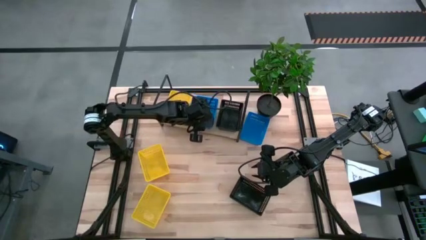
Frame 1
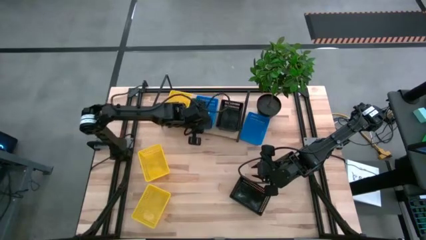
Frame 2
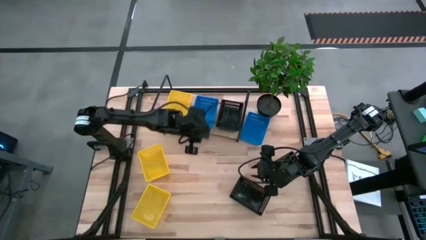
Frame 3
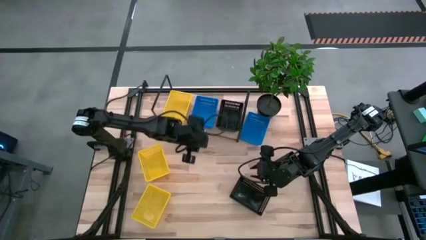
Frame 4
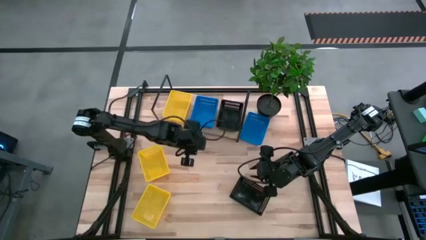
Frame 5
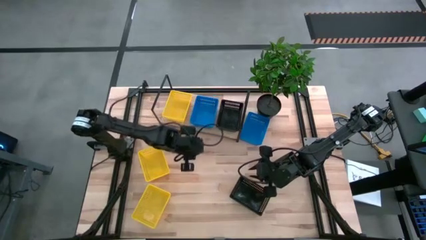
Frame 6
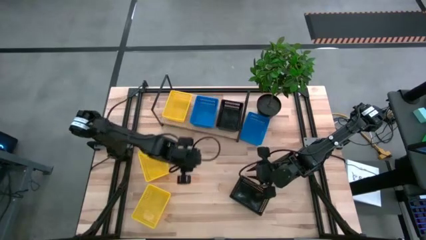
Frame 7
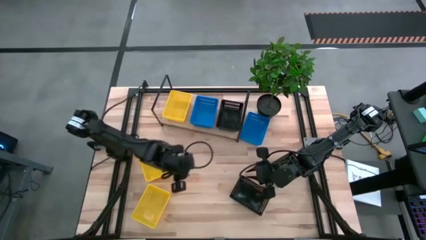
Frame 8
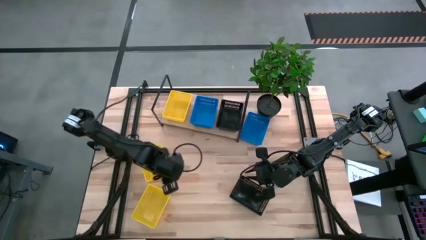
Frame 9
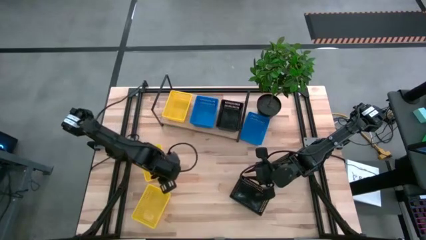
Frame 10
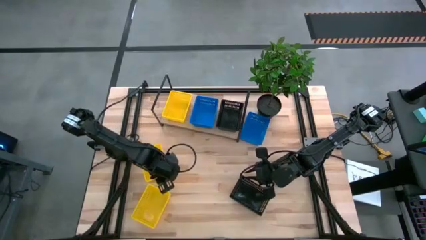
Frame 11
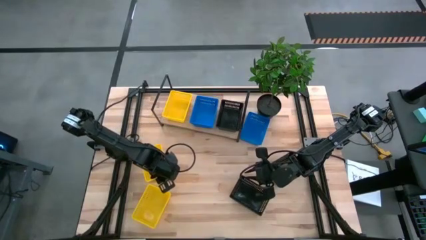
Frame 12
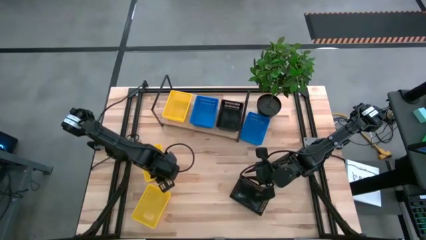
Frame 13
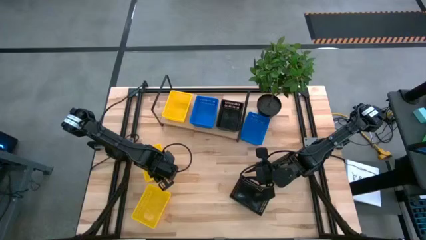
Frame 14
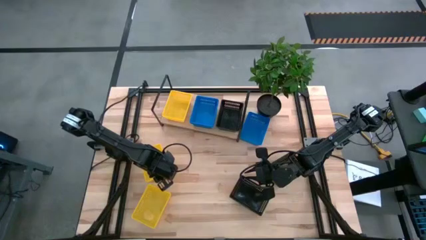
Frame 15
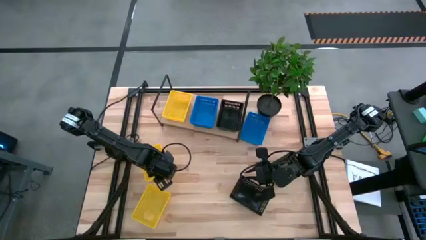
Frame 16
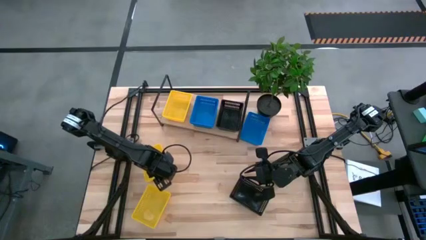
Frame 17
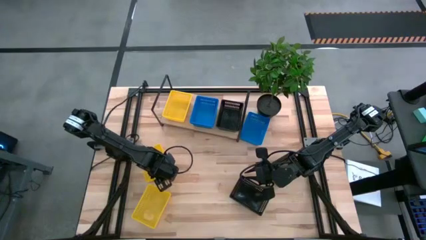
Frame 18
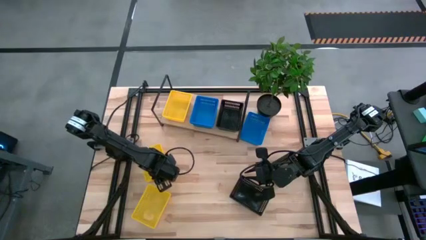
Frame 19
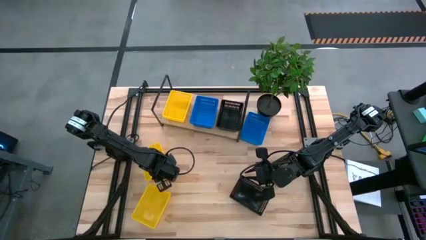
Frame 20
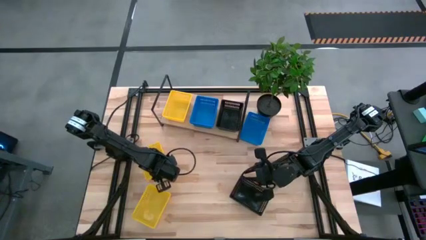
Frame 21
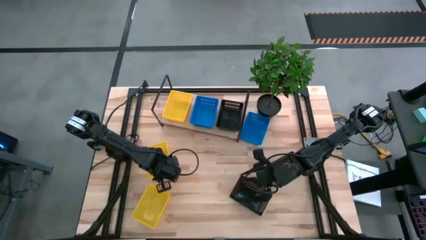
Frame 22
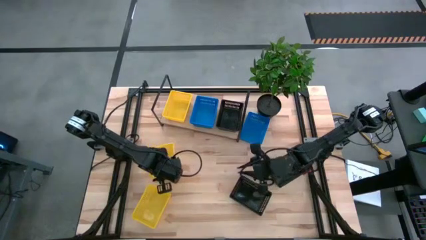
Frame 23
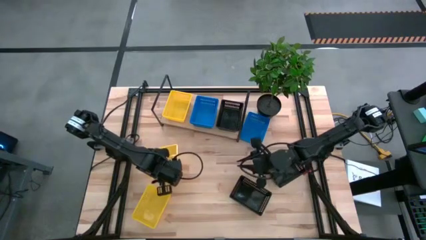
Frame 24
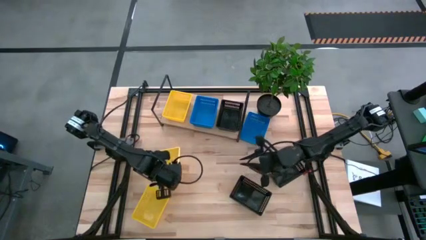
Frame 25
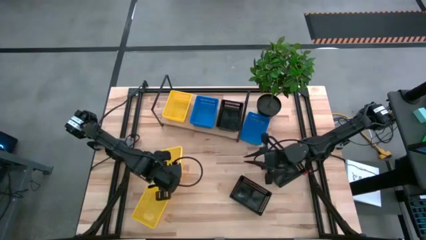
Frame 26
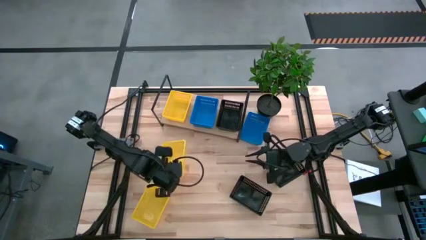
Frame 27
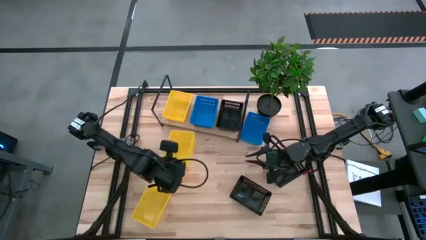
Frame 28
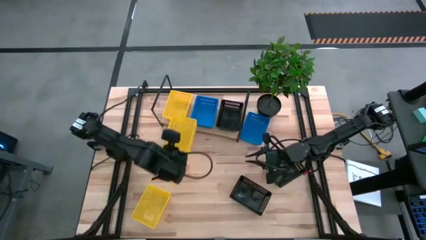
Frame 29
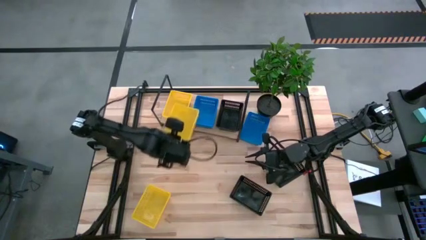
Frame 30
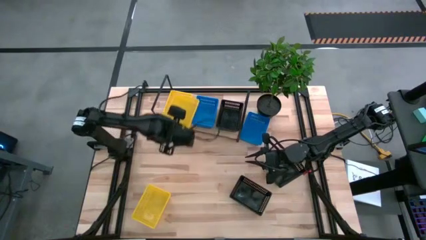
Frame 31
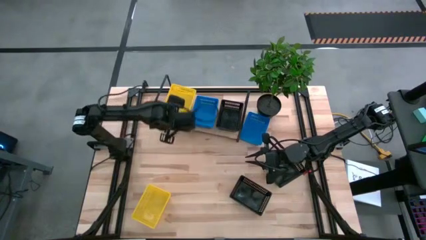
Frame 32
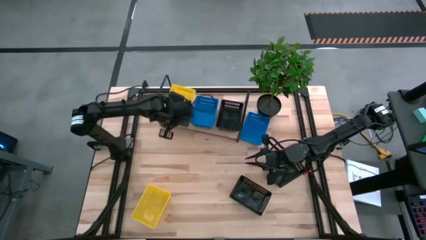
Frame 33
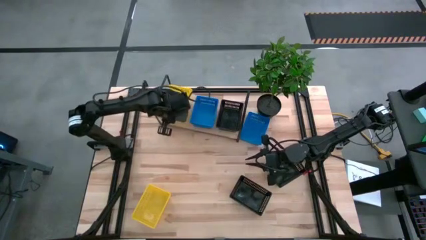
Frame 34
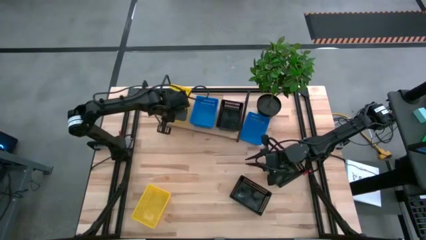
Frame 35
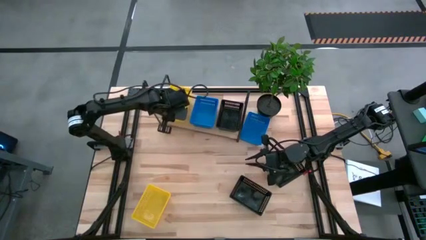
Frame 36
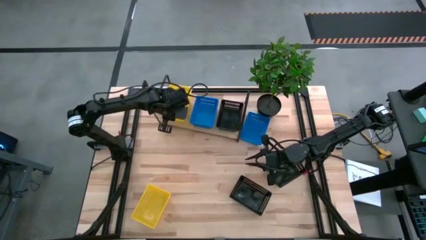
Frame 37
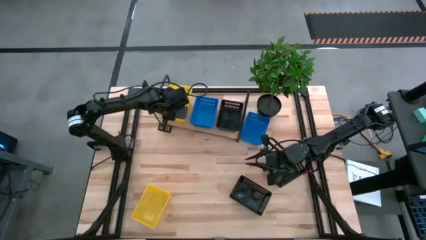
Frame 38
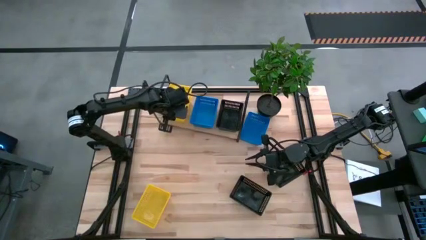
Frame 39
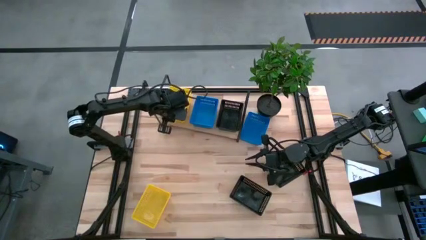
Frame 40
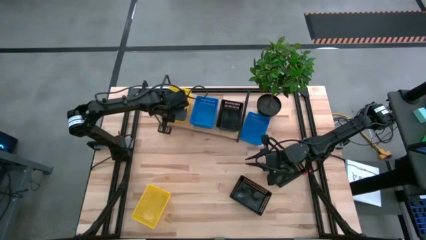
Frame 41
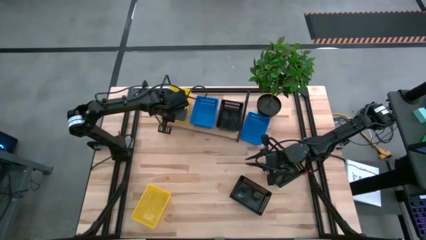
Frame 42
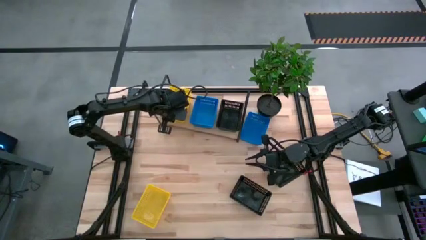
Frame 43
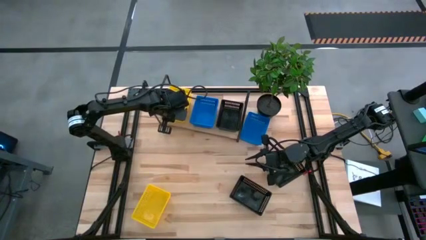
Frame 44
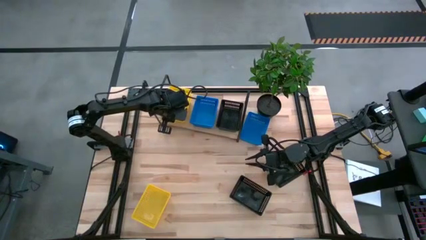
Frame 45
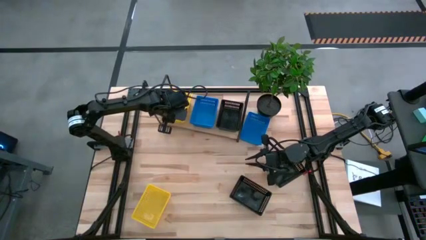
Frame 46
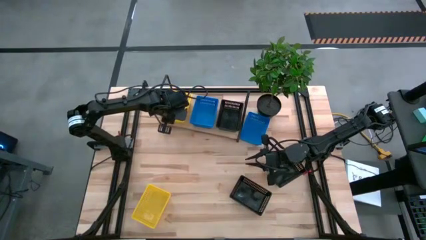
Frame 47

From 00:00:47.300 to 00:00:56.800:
Task: Stack baskets on shelf by color
Stack the top yellow basket on top of the other yellow basket on the shelf

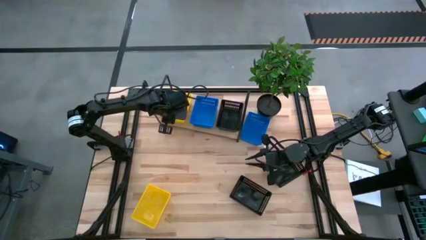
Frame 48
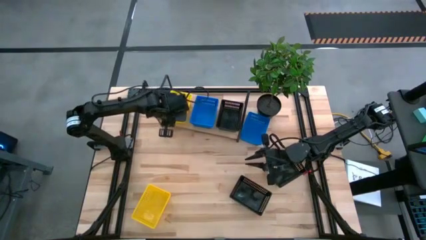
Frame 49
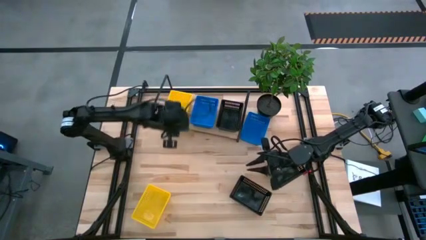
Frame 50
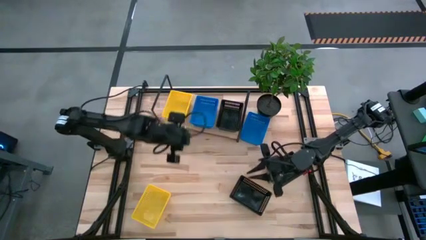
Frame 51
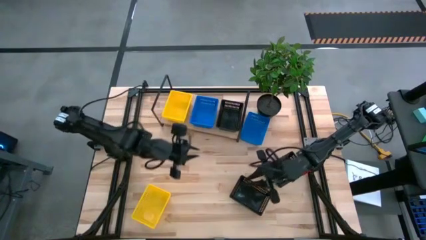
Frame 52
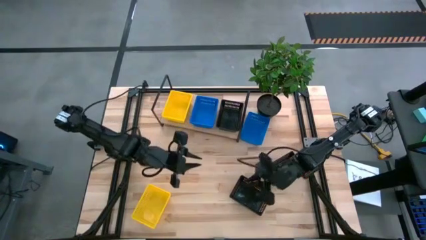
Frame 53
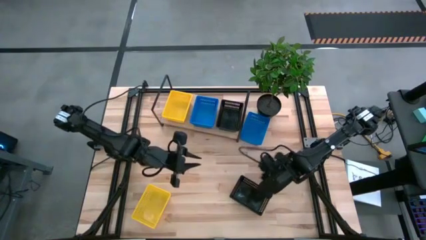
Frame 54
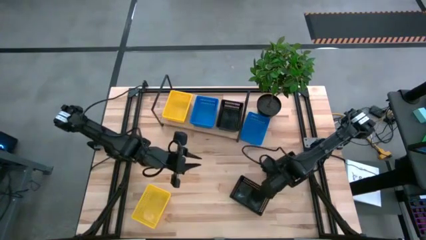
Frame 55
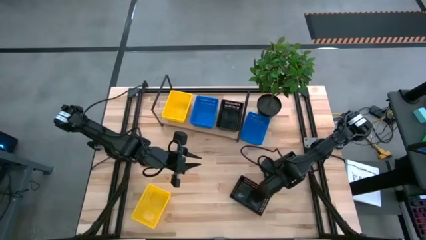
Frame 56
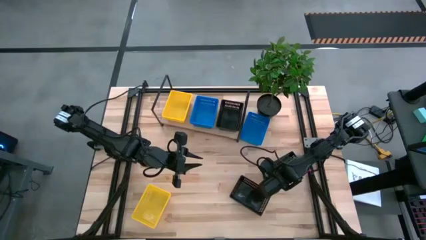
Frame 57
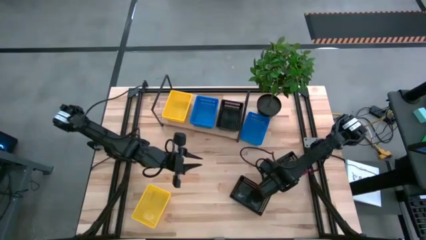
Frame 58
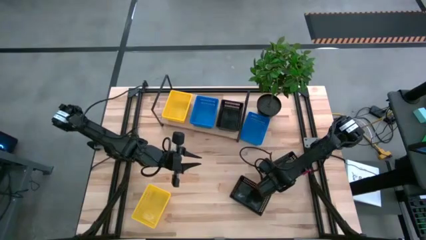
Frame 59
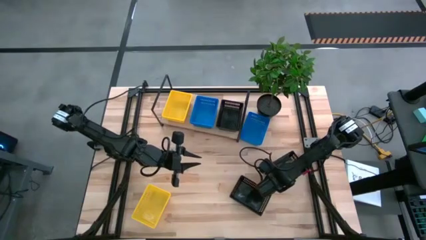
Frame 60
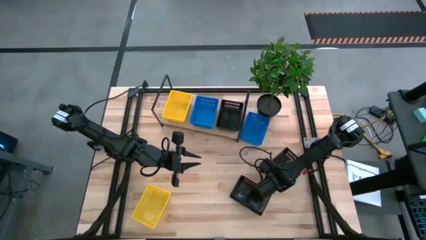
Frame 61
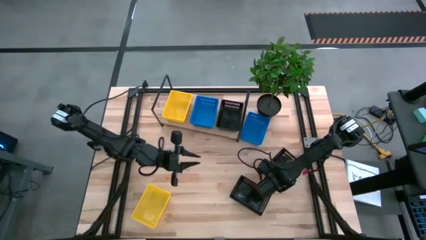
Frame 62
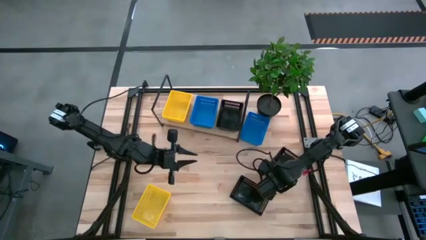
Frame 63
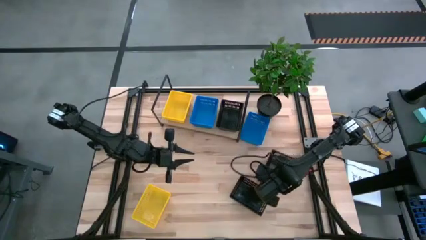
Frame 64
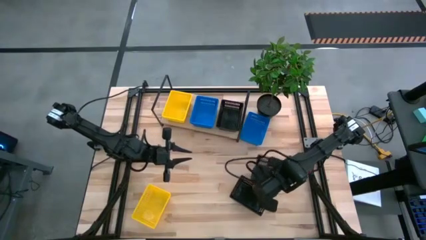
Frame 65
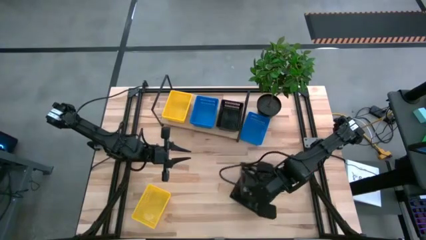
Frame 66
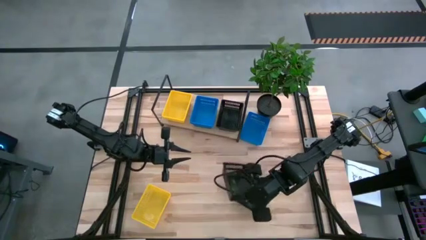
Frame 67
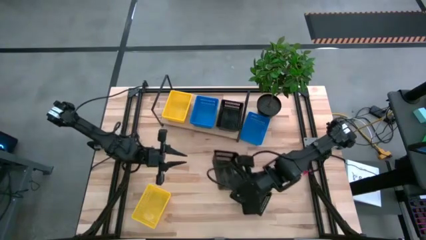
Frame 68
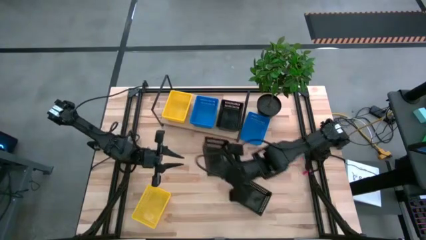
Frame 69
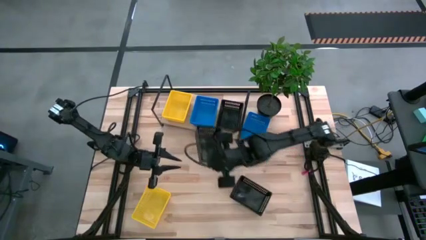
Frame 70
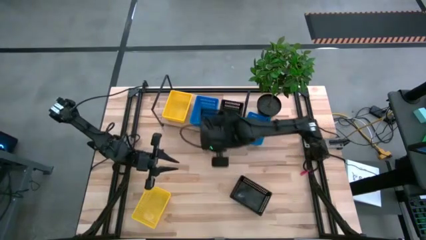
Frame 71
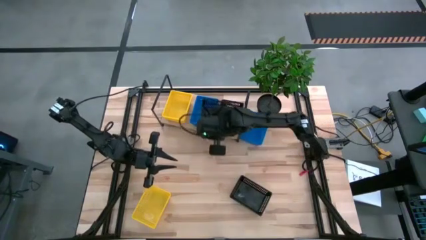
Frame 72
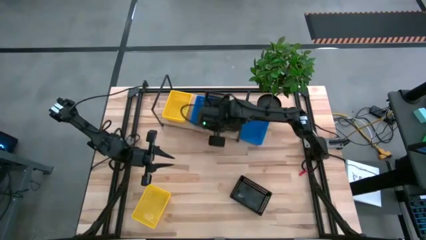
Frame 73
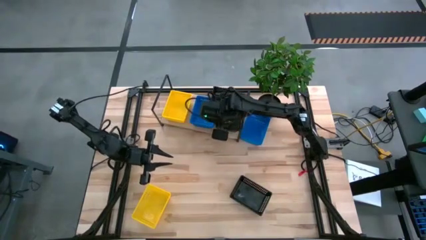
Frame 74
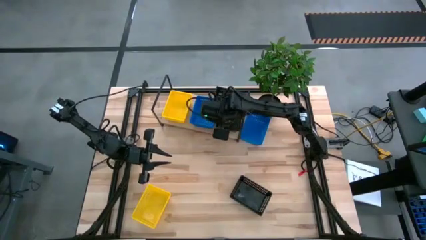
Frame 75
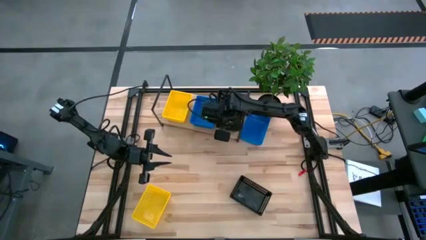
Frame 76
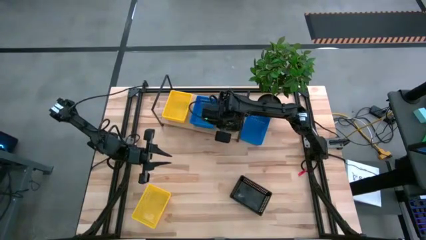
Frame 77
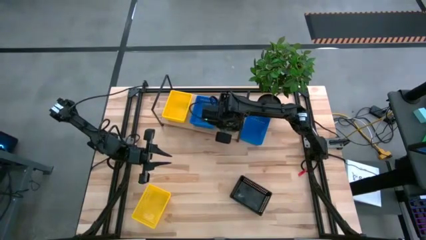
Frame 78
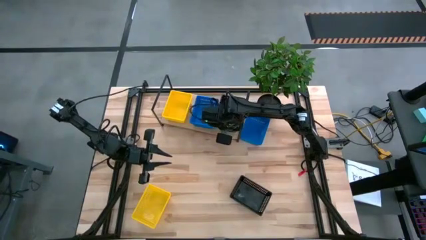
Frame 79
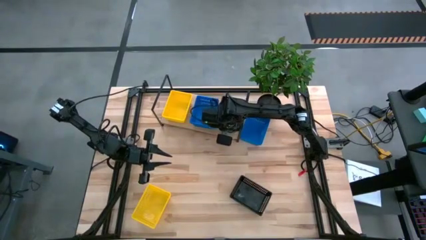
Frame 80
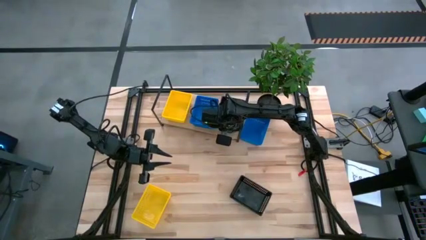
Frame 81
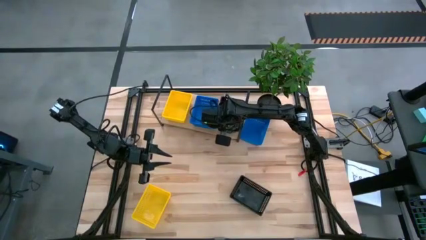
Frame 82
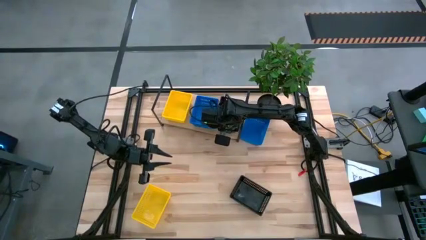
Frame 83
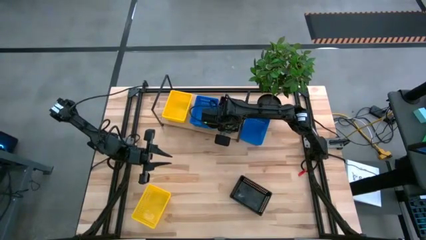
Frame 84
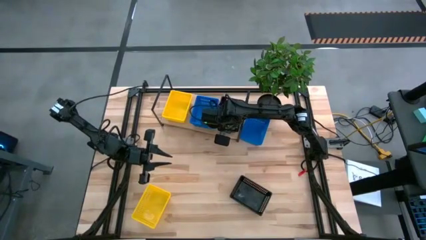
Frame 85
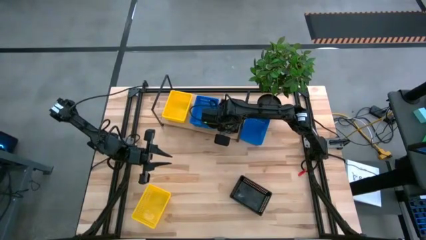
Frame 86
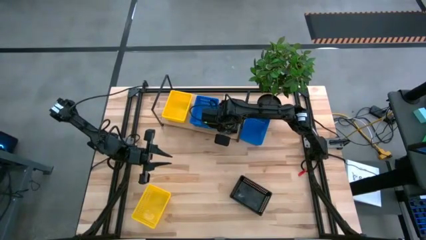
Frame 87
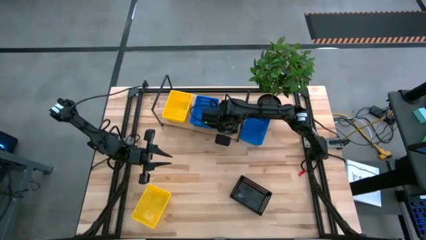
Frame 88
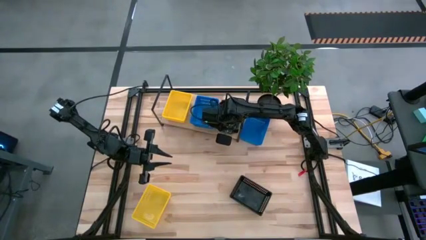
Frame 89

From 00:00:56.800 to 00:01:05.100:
Stack the right black basket on top of the other black basket on the shelf
